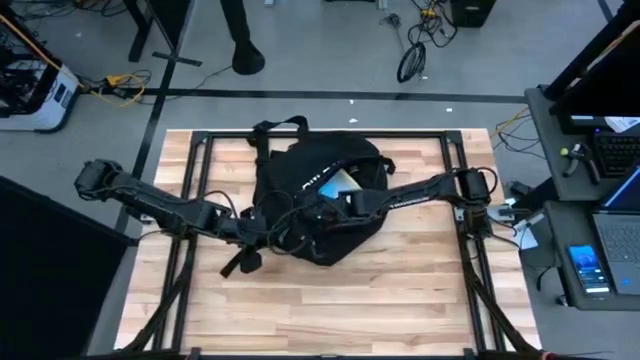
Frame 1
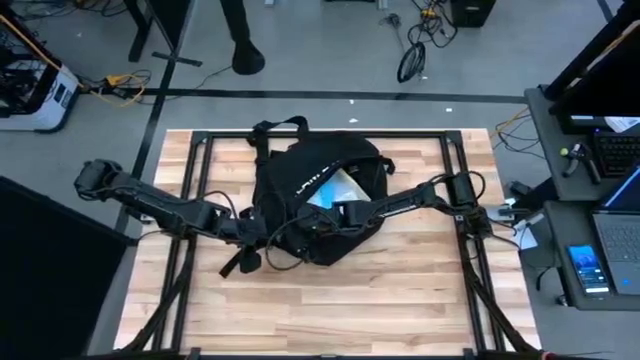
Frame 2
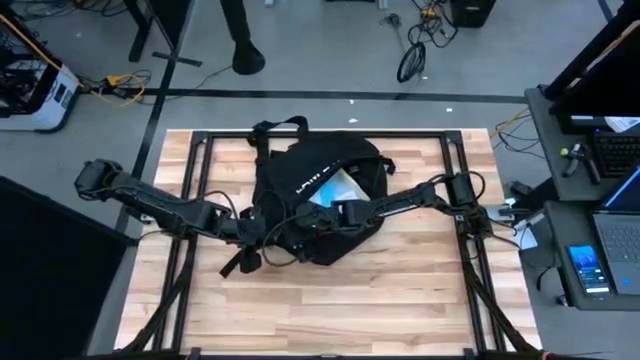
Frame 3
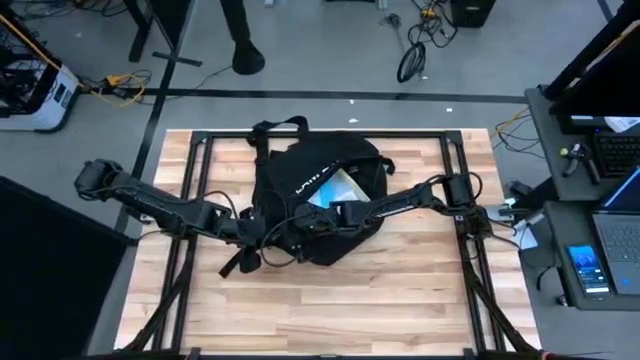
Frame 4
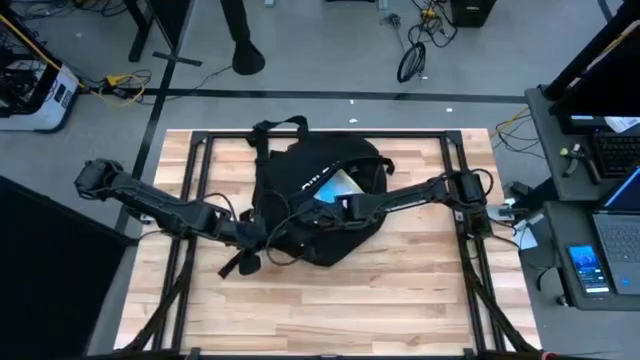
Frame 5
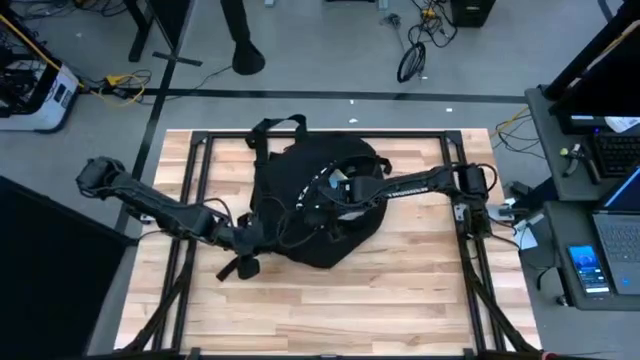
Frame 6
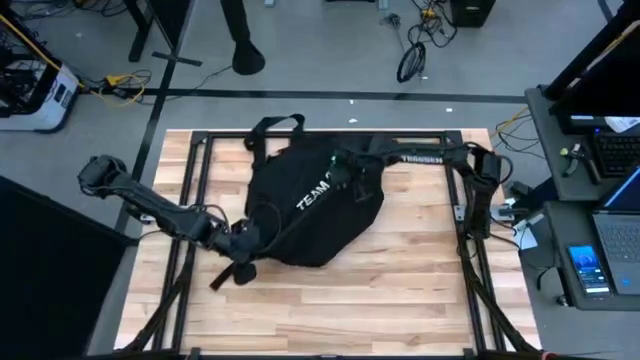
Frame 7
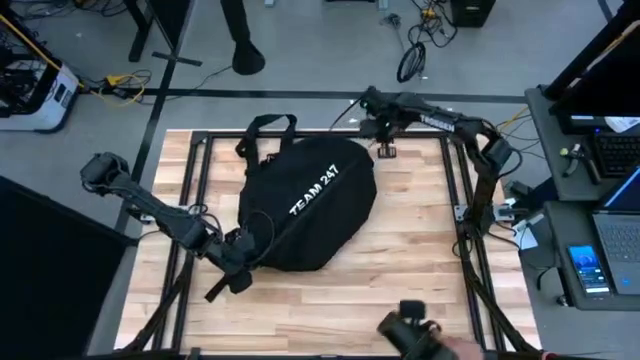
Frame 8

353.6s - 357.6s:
Task: Unpack backpack
Close the black backpack

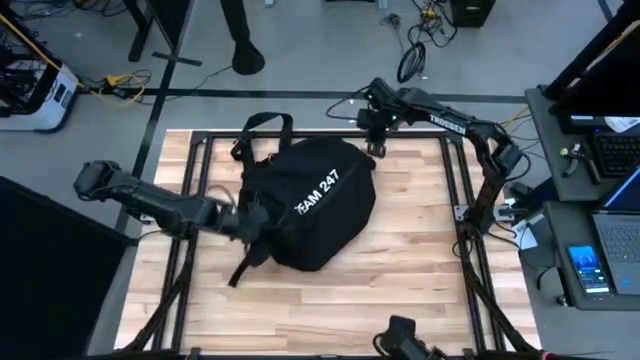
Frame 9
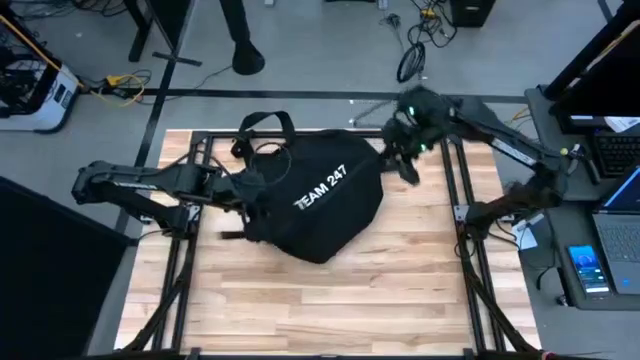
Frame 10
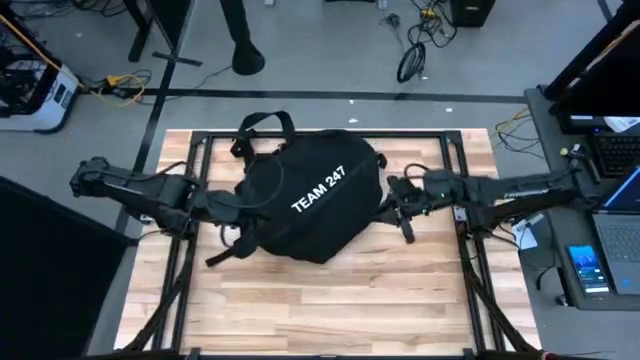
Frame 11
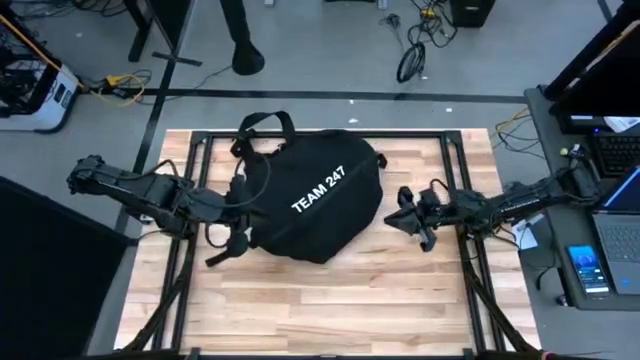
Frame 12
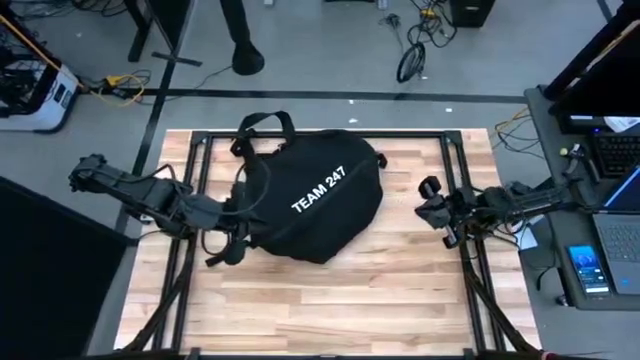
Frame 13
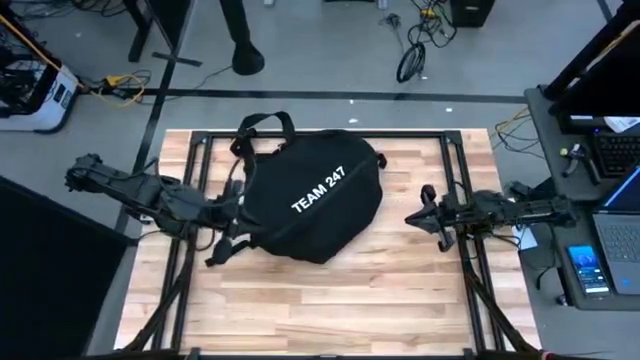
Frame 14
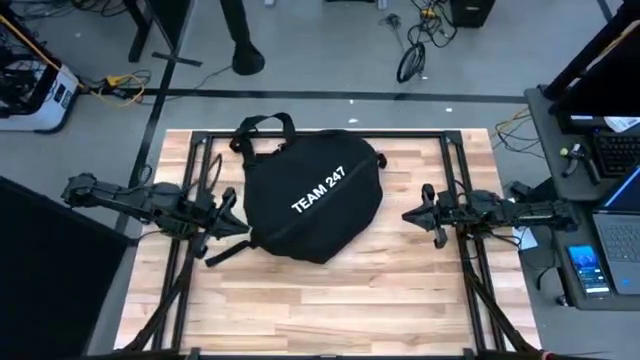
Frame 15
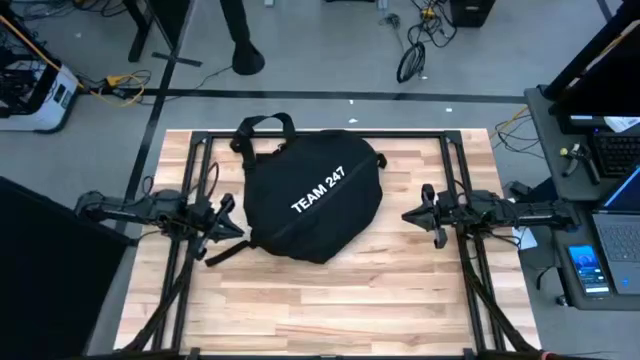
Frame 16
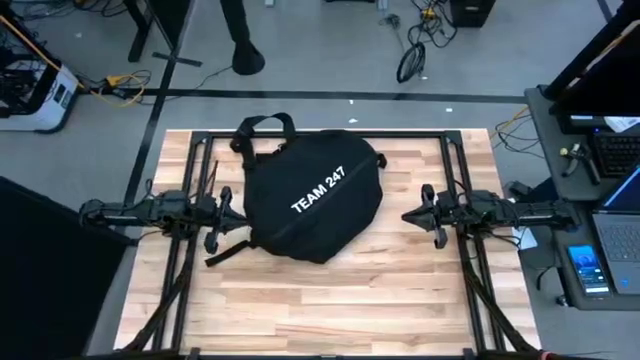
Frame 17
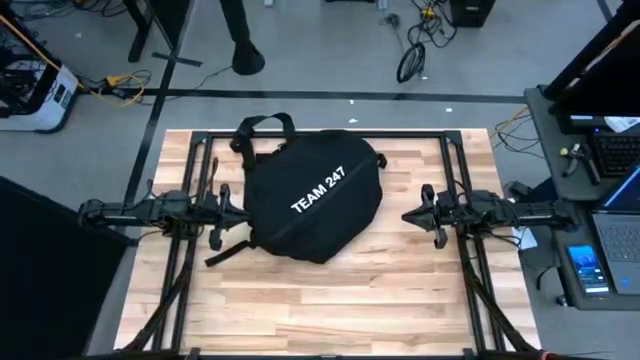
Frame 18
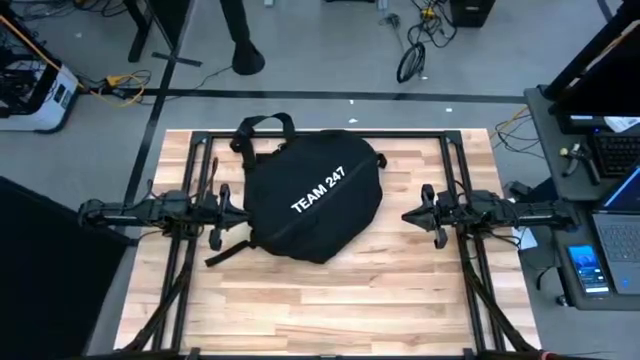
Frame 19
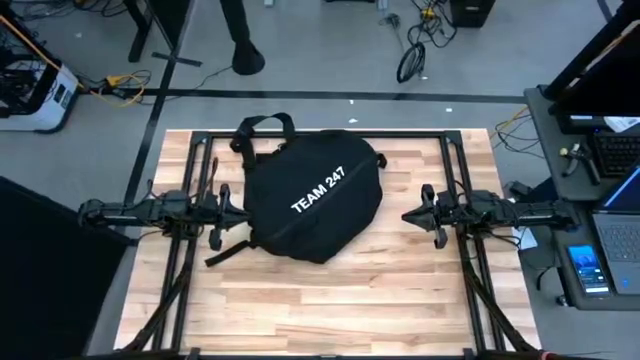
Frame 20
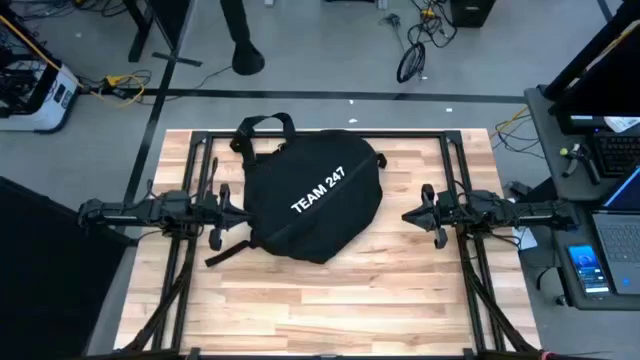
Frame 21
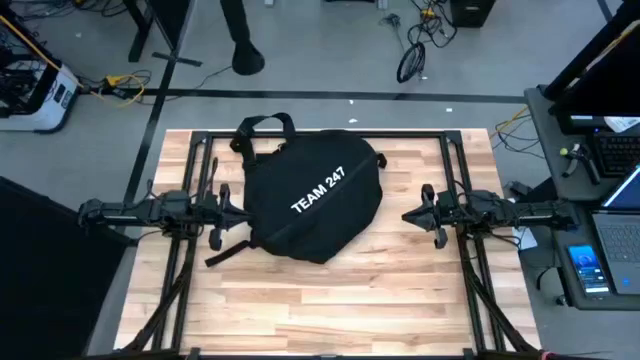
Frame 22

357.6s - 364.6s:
Return to Home Position

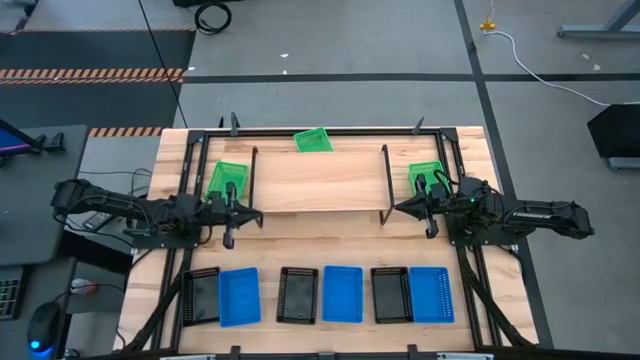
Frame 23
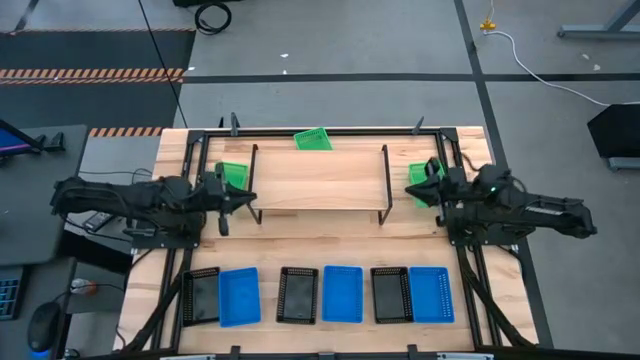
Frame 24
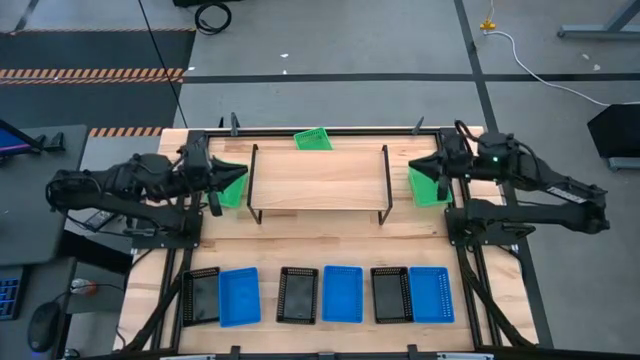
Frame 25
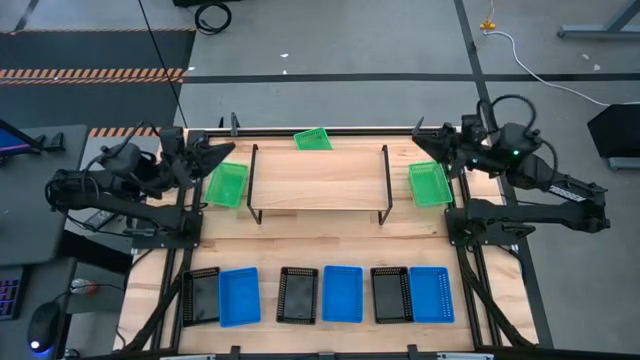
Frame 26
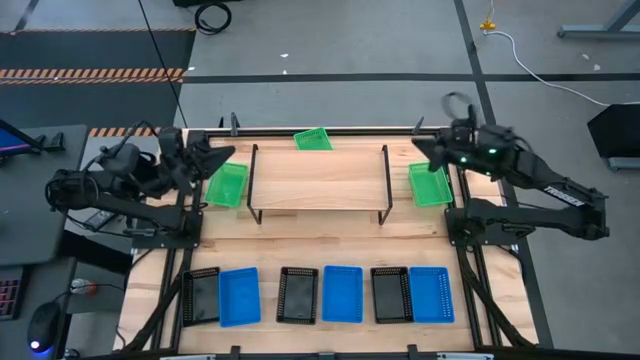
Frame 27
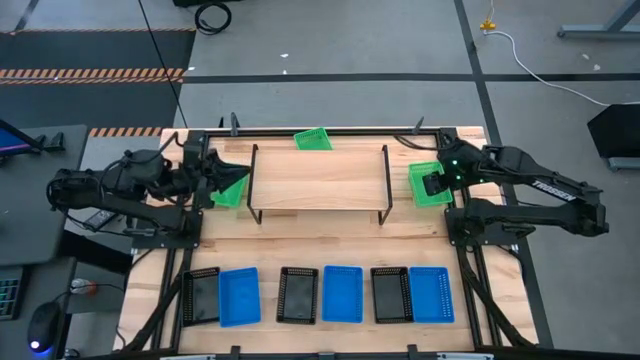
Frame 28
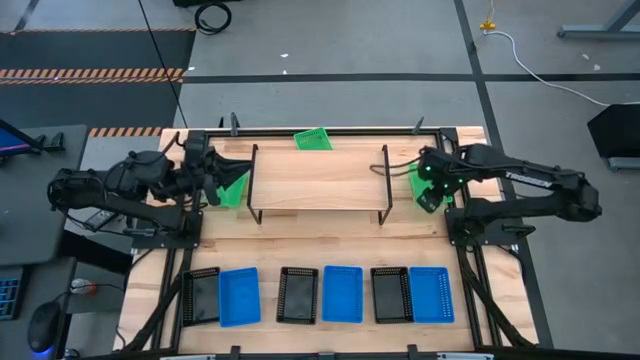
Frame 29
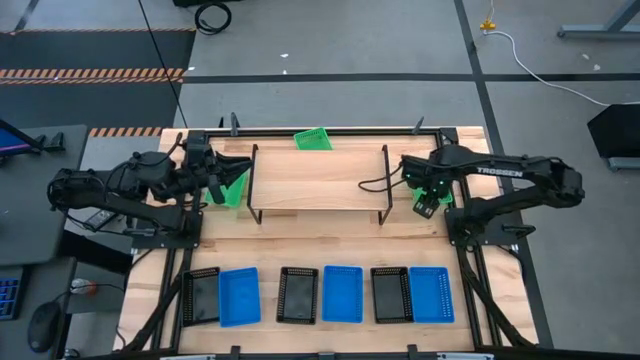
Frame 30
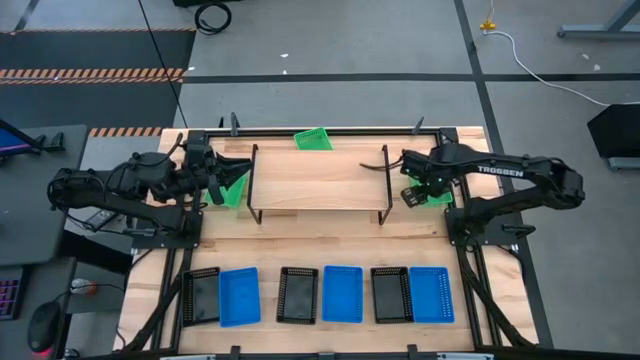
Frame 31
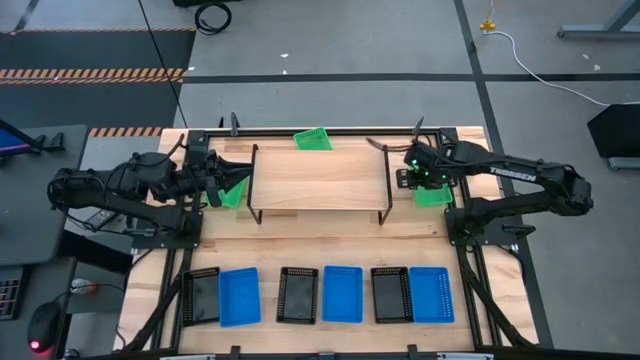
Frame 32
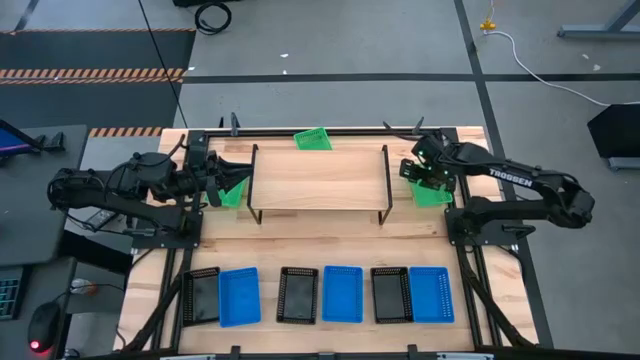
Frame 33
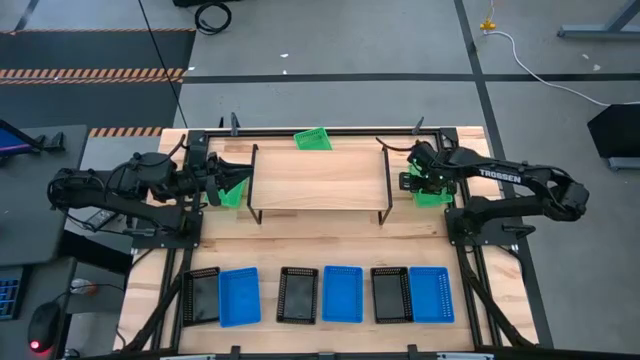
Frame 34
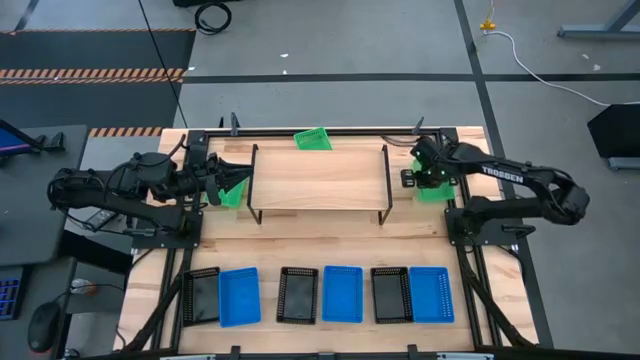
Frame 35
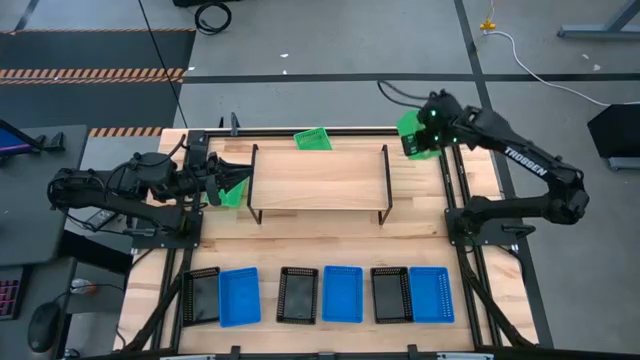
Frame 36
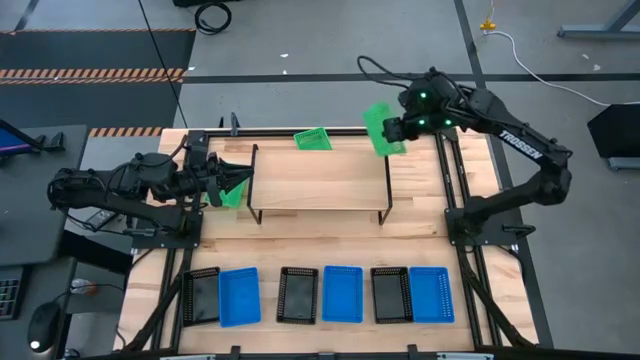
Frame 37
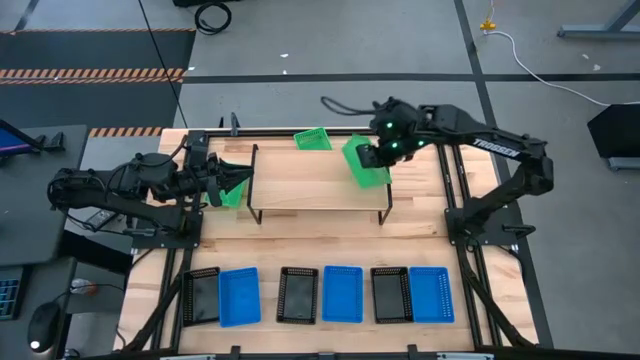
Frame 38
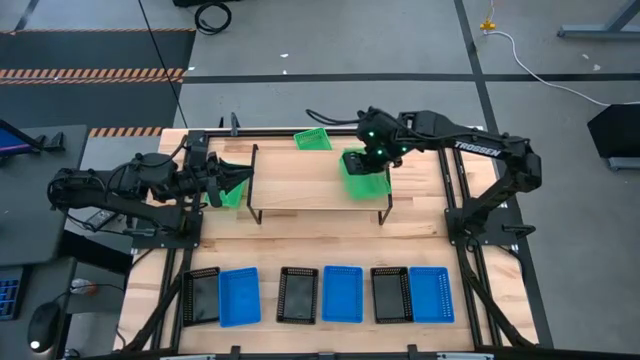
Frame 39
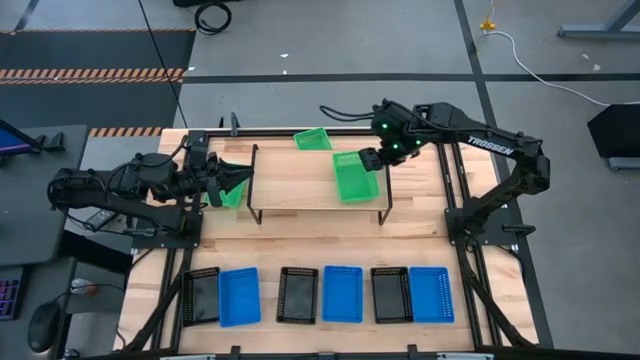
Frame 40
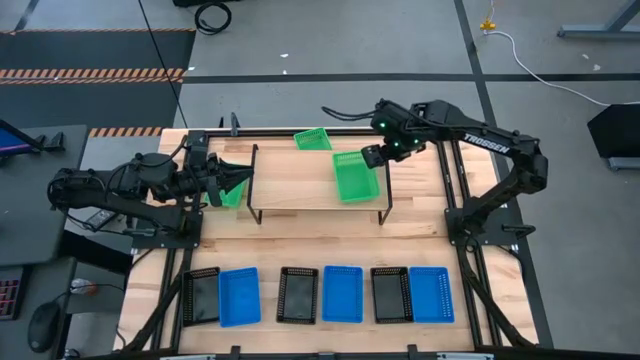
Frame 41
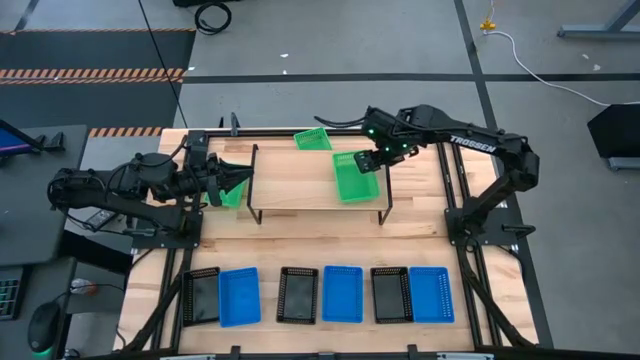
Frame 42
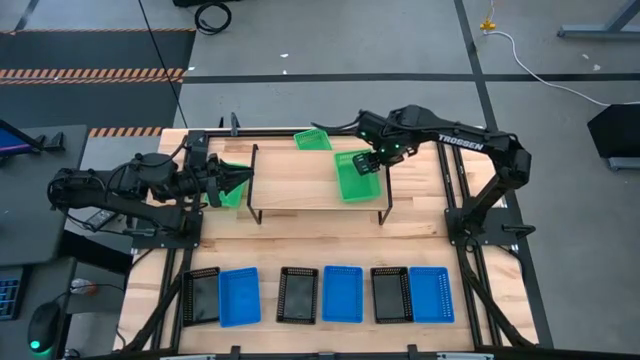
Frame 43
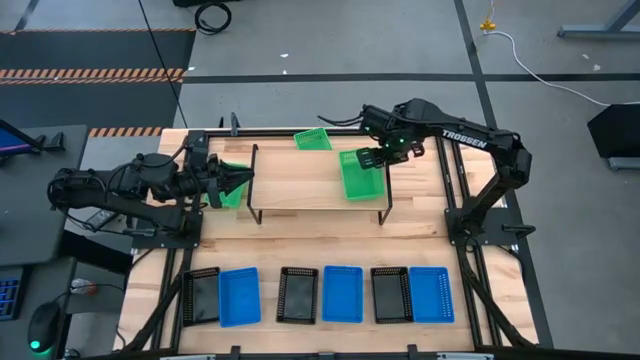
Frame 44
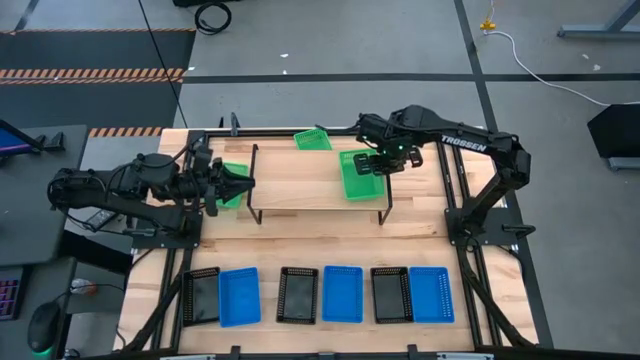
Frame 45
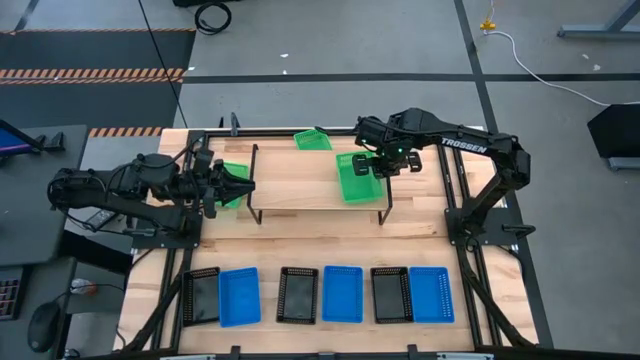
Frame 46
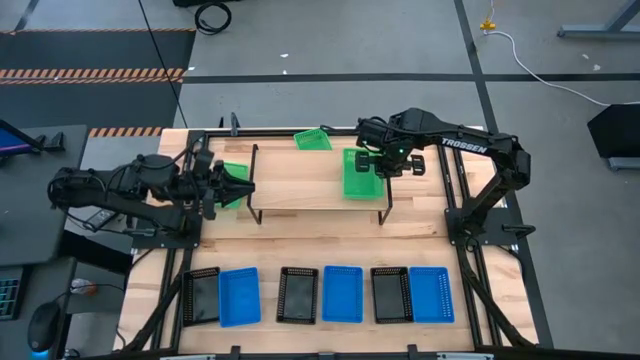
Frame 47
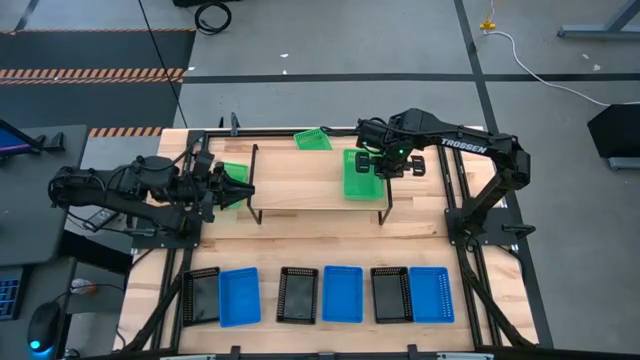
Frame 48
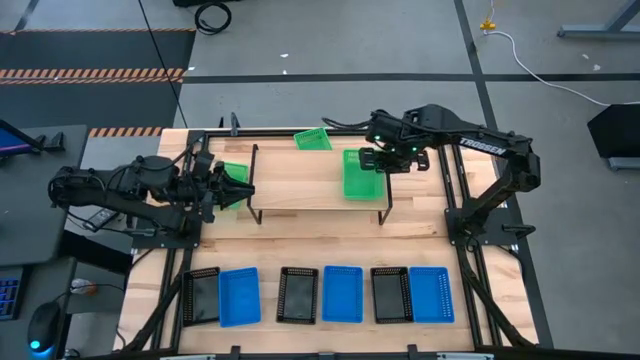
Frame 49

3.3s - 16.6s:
Task: Stack baskets on shelf by color
Put the right green bin on the shelf
